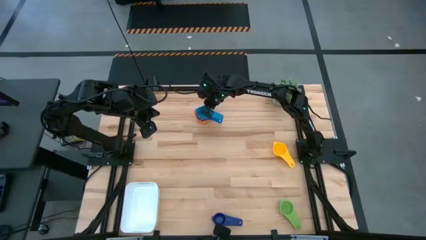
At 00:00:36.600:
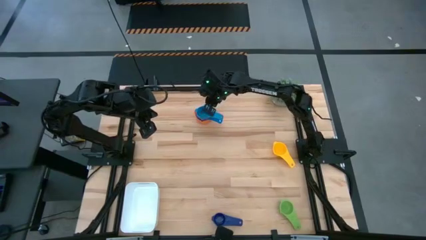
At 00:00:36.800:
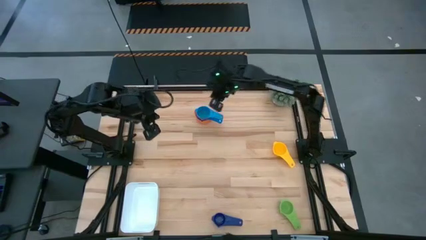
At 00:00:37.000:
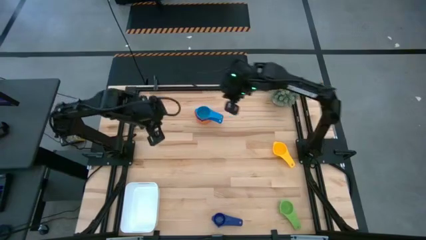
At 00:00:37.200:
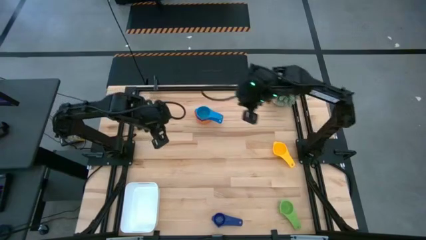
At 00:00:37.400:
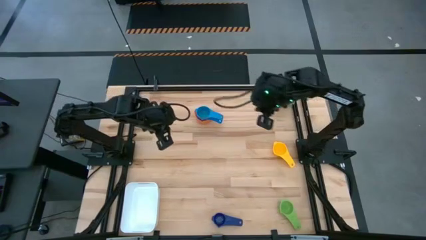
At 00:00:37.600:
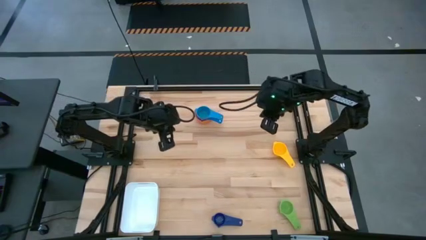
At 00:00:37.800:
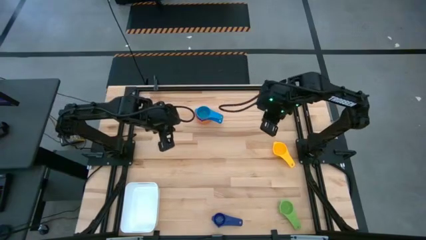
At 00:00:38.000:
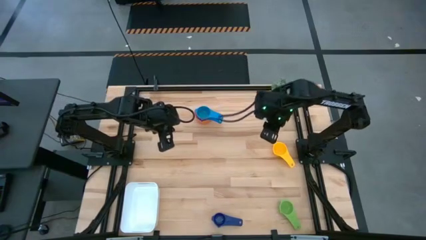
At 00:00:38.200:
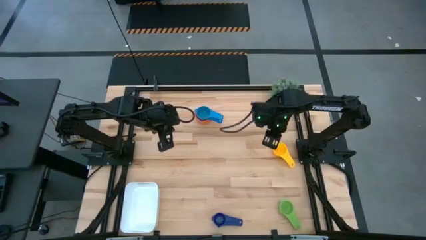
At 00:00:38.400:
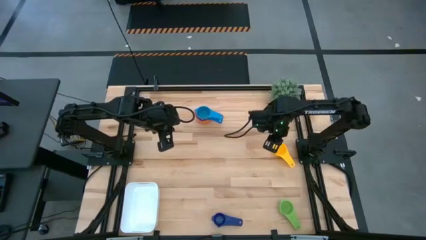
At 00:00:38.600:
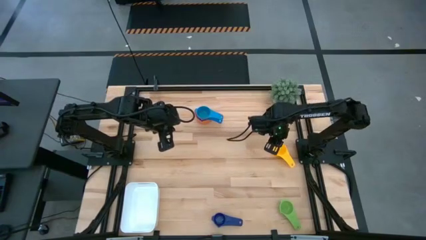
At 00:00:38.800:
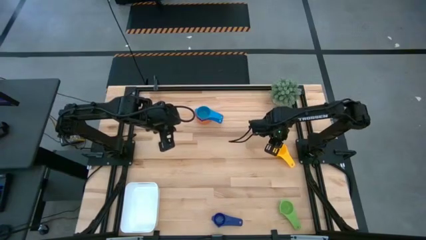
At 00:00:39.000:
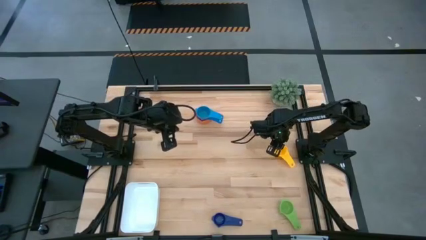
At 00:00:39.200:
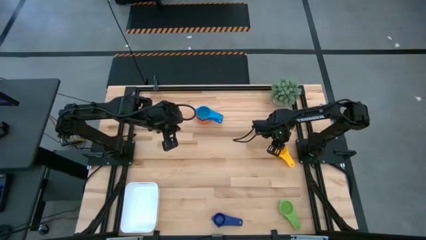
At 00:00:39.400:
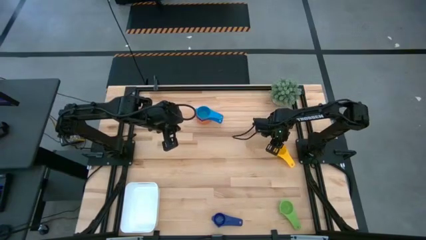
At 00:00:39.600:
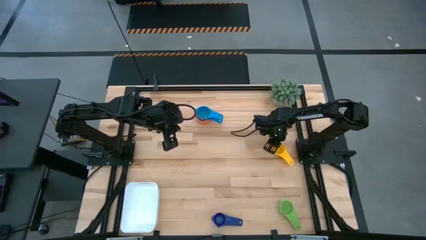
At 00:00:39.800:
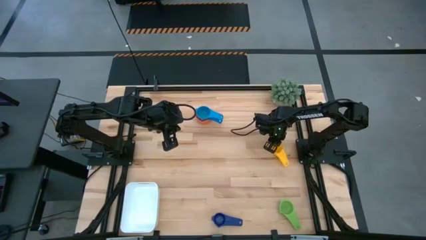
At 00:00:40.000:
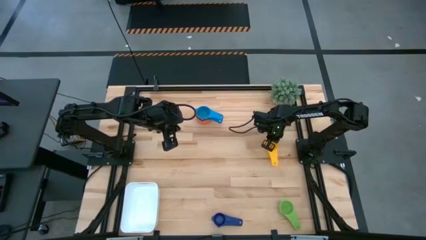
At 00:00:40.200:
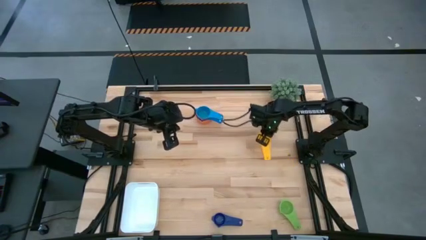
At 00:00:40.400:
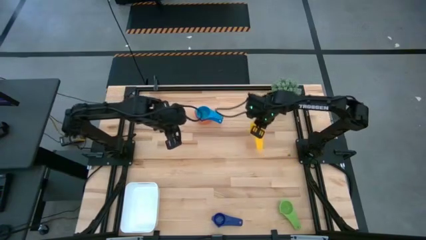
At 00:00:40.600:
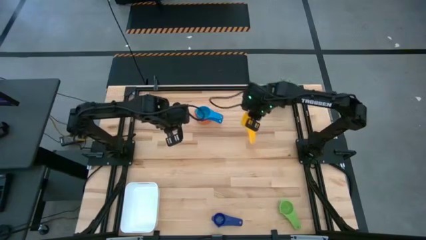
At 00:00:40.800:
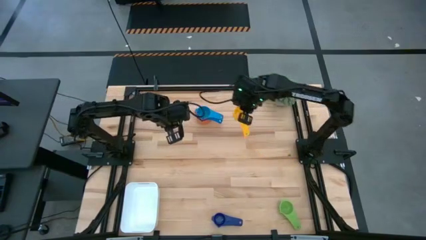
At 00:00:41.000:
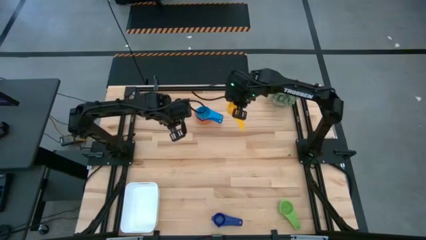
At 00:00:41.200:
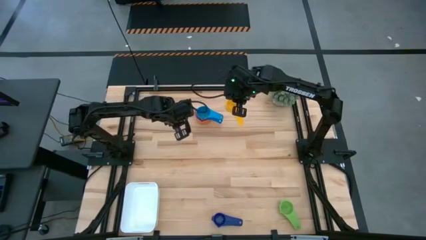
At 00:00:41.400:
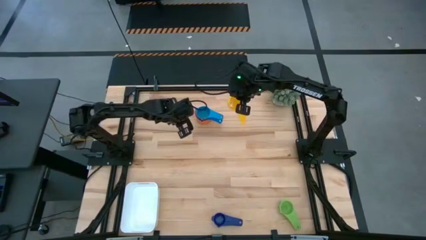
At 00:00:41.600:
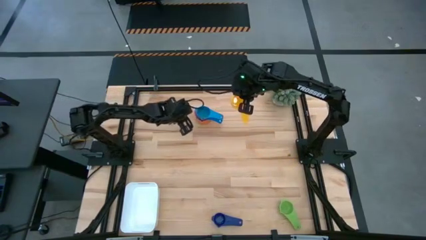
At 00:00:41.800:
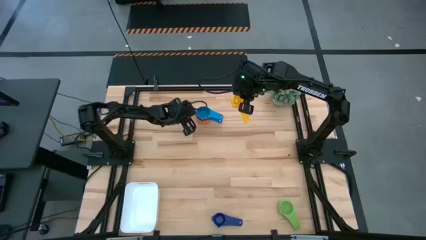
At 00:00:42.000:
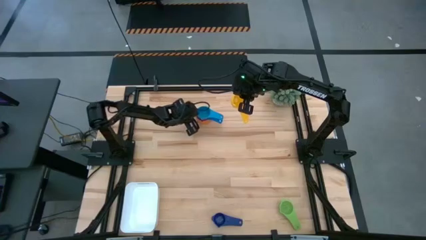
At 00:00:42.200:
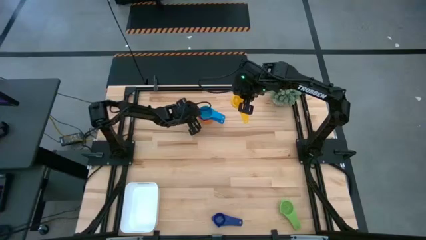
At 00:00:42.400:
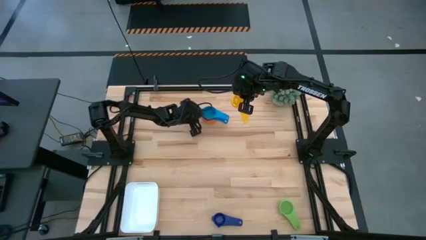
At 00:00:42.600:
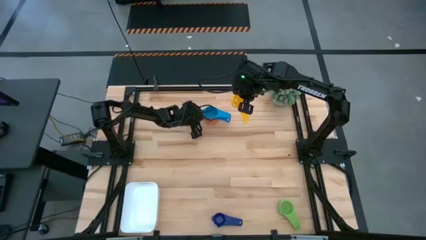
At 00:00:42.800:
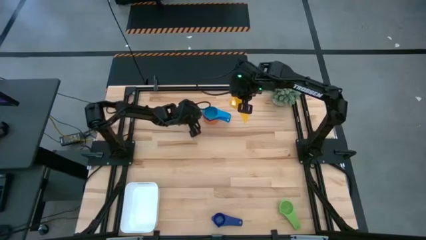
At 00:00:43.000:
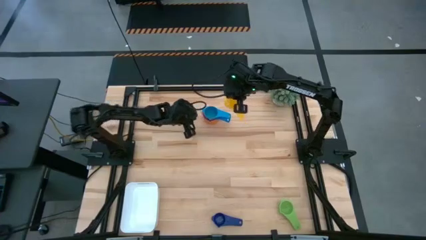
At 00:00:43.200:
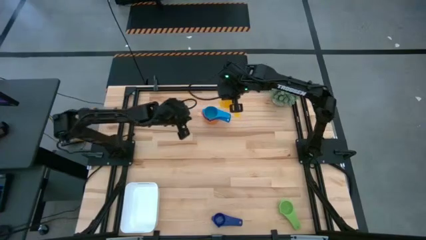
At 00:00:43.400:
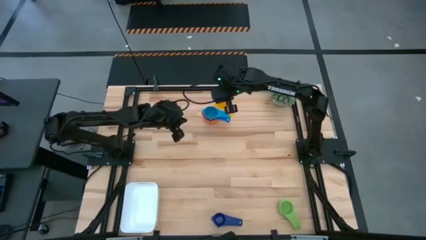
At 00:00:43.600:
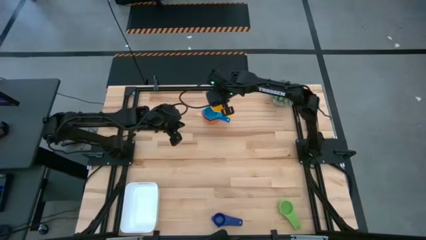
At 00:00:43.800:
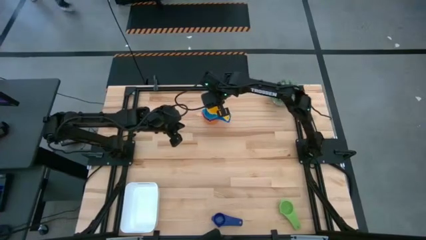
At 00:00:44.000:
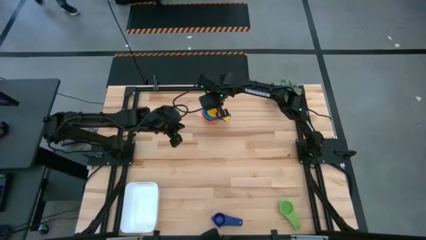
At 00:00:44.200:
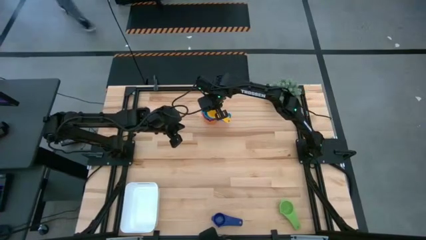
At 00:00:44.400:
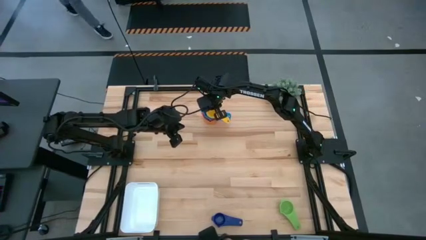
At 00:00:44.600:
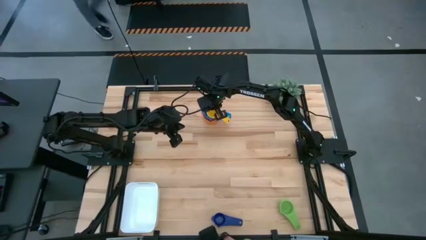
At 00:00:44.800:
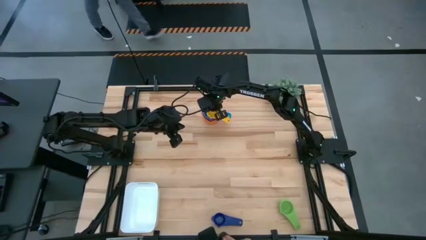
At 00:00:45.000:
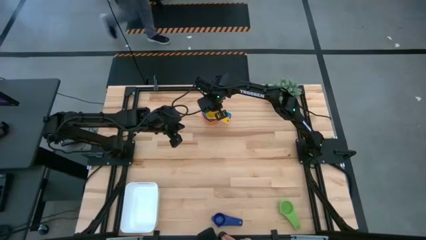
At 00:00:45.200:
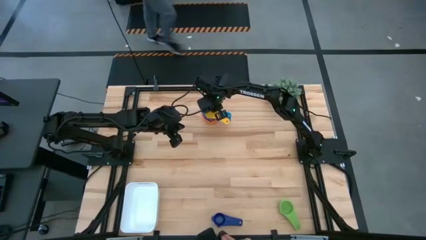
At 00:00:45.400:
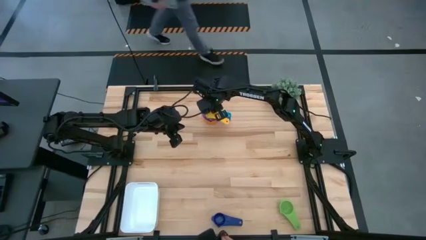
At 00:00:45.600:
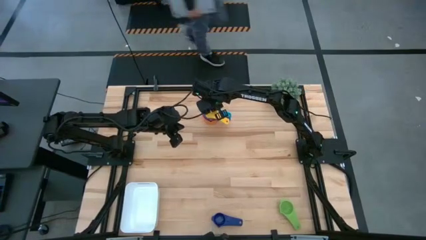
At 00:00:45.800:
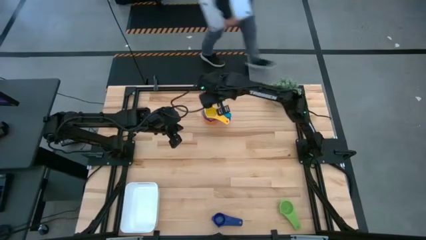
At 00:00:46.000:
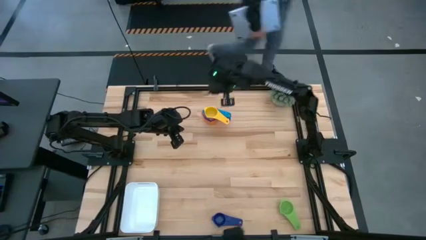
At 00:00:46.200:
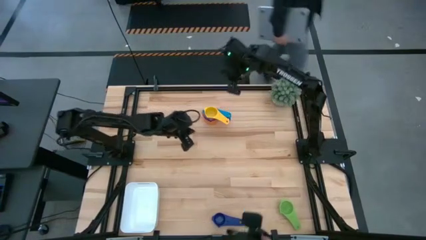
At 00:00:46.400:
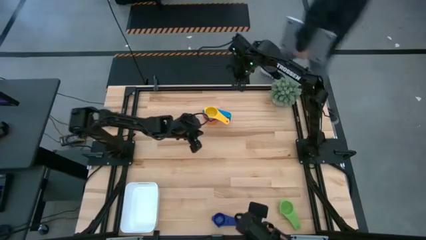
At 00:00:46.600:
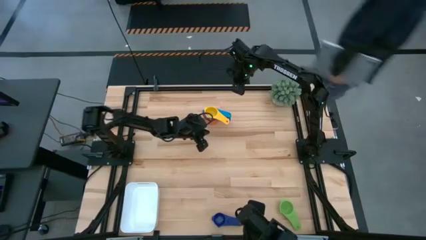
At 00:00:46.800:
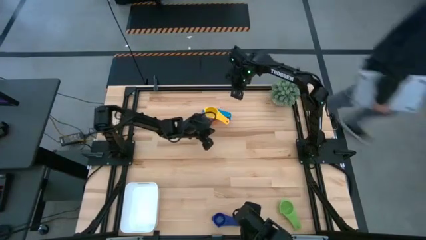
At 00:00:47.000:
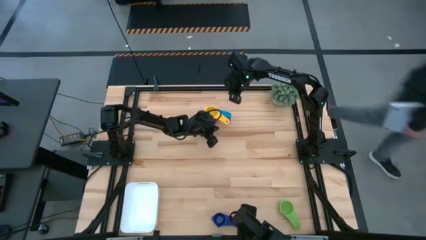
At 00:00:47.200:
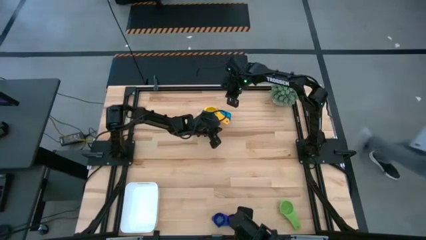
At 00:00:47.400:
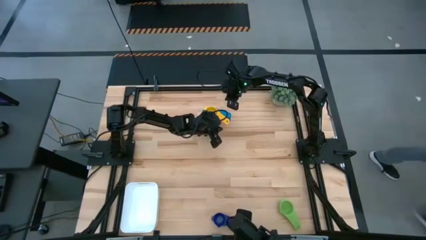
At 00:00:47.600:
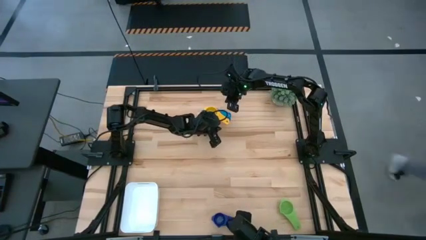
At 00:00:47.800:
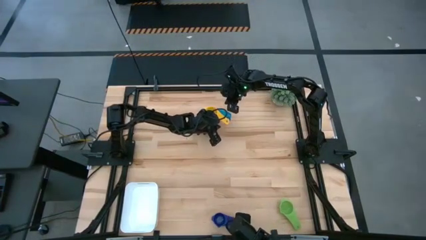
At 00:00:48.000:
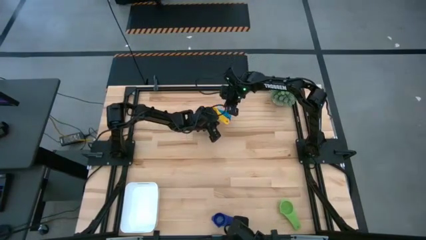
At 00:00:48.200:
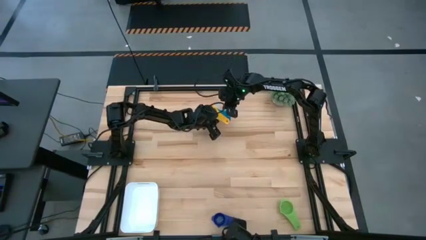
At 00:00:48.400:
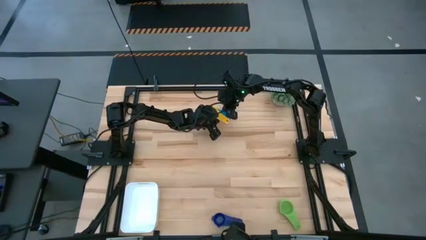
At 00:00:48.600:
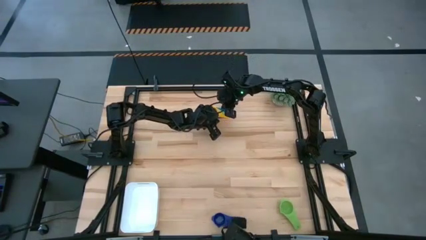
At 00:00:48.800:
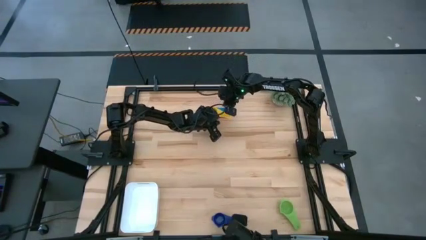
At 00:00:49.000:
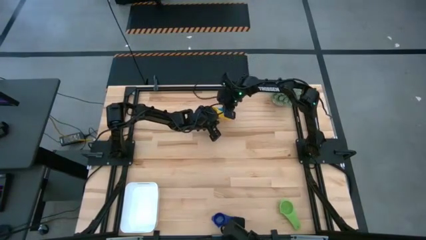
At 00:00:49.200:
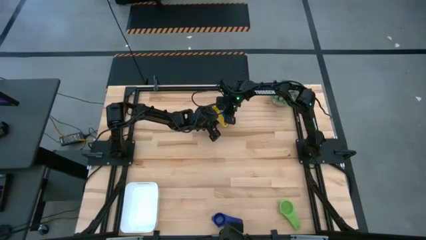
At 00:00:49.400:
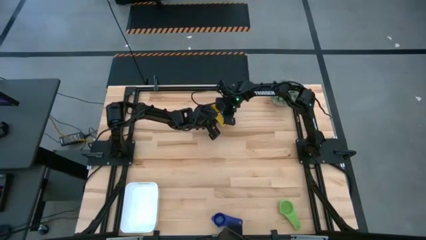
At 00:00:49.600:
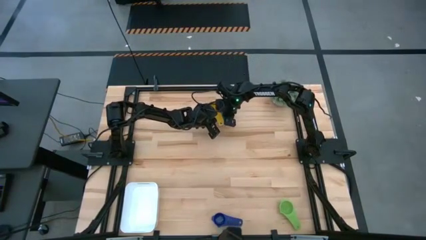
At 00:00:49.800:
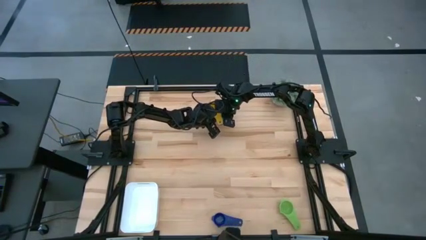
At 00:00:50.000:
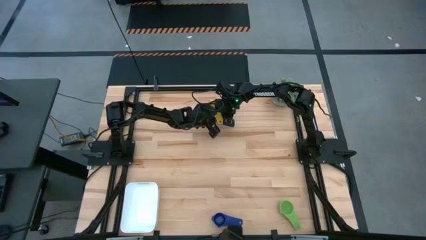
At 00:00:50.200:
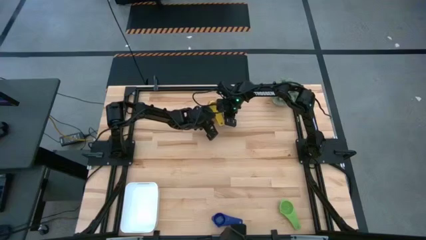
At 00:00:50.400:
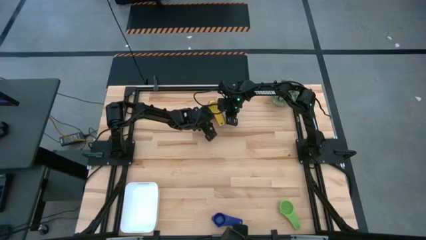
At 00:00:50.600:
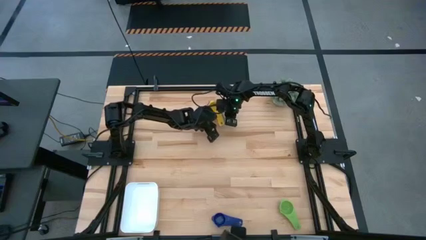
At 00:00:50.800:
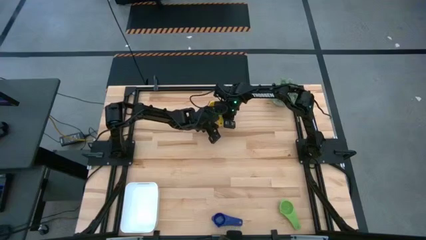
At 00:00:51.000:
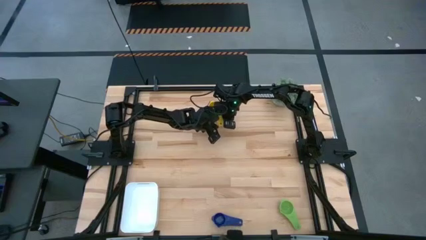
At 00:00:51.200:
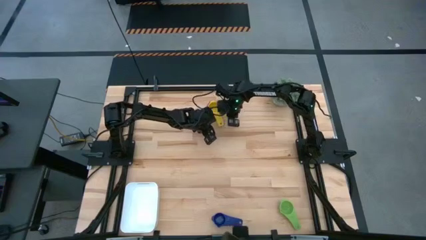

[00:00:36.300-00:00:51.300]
Task: Nest measuring cups in basket
Stack the yellow measuring cup on top of the blue measuring cup
